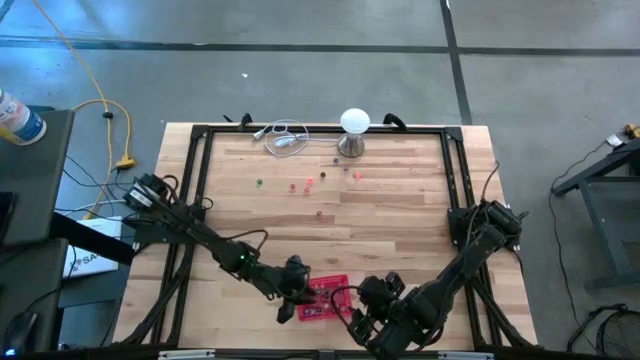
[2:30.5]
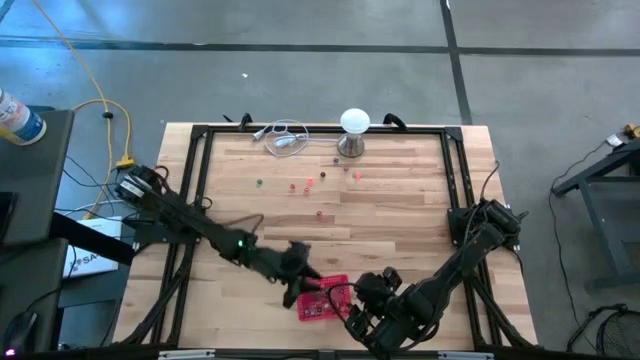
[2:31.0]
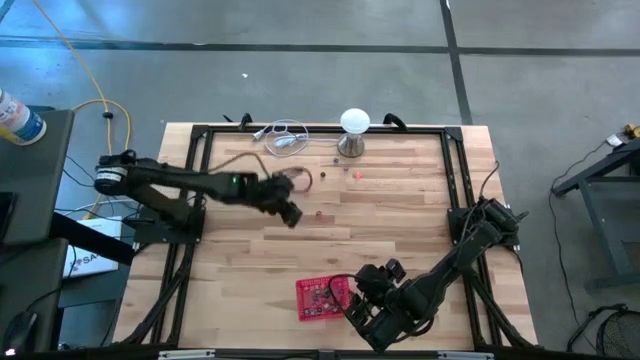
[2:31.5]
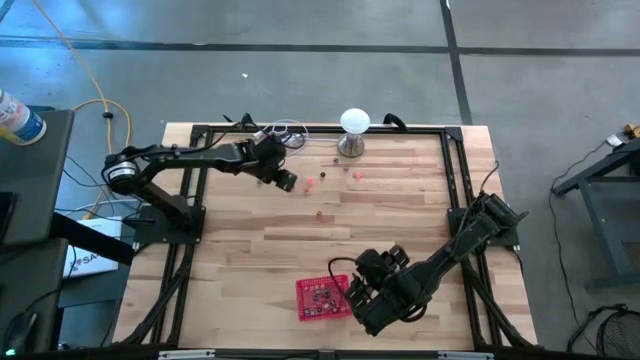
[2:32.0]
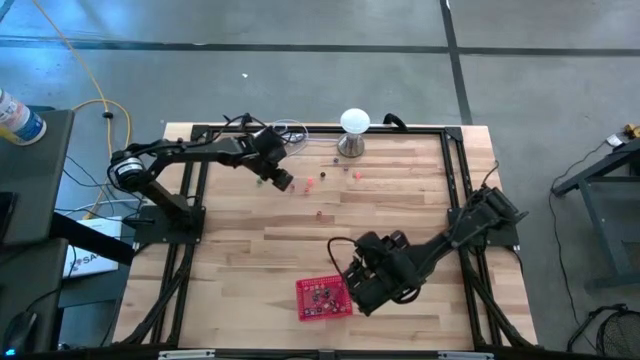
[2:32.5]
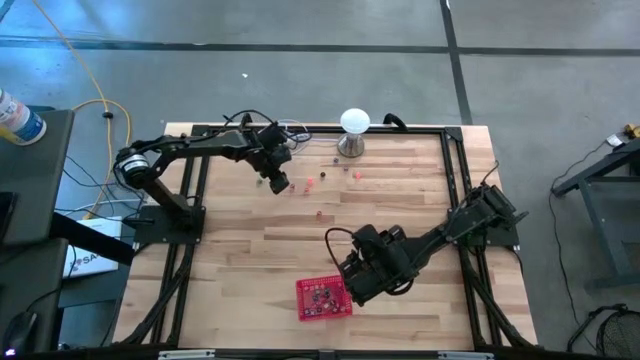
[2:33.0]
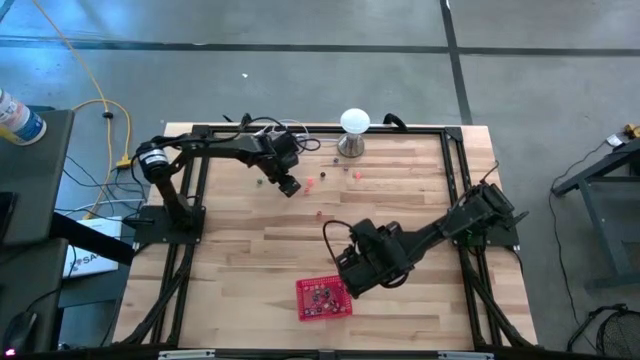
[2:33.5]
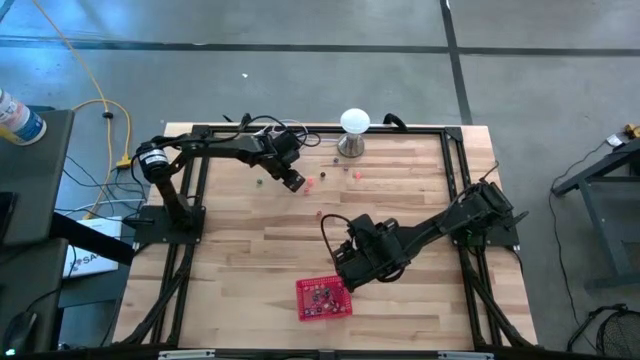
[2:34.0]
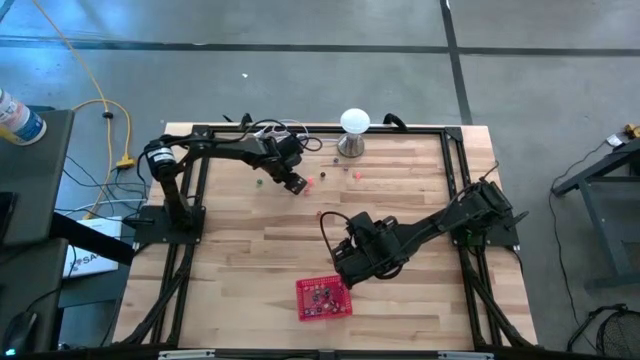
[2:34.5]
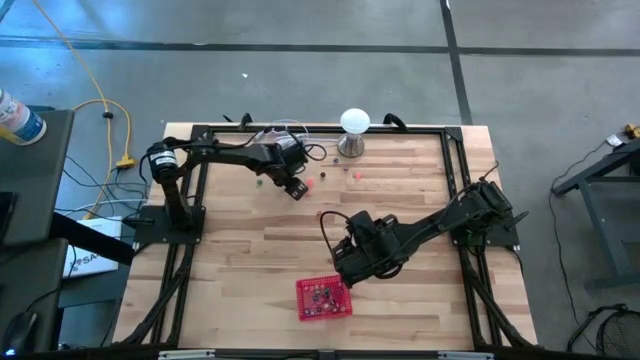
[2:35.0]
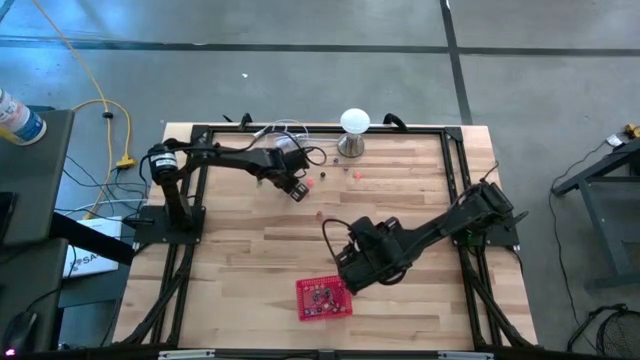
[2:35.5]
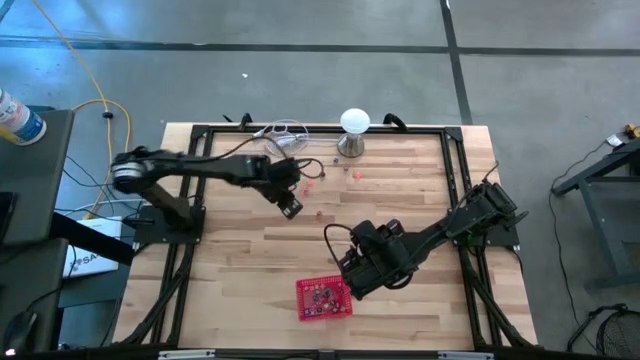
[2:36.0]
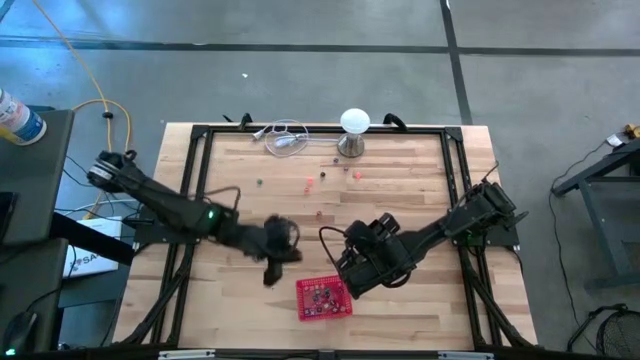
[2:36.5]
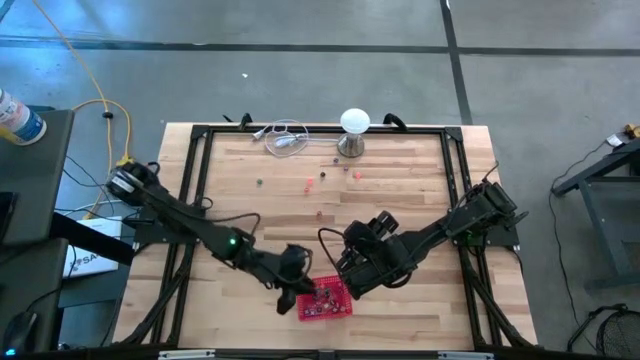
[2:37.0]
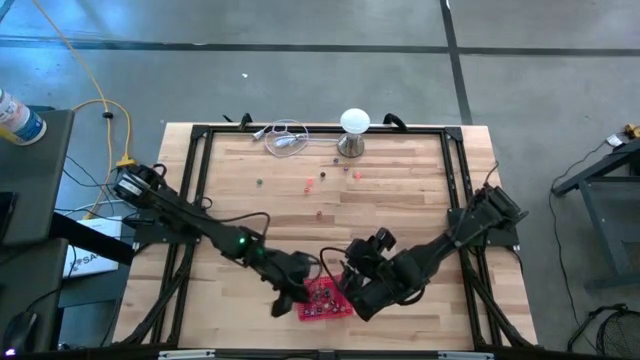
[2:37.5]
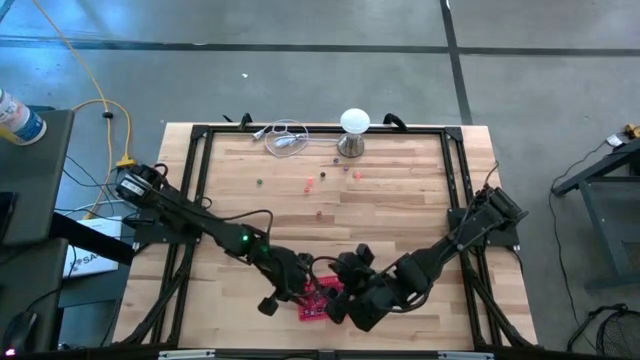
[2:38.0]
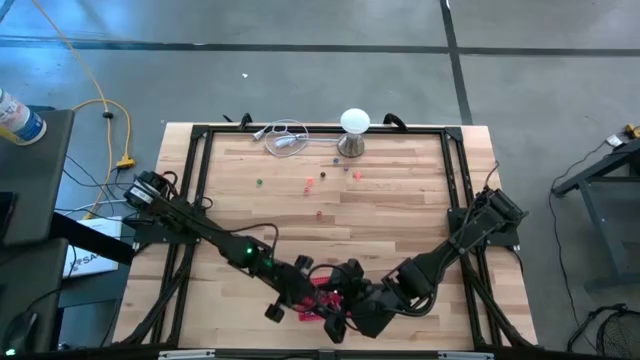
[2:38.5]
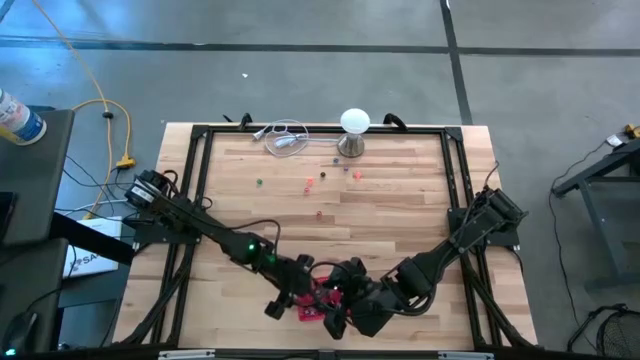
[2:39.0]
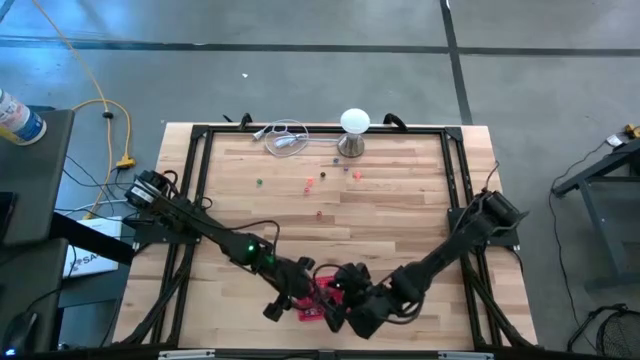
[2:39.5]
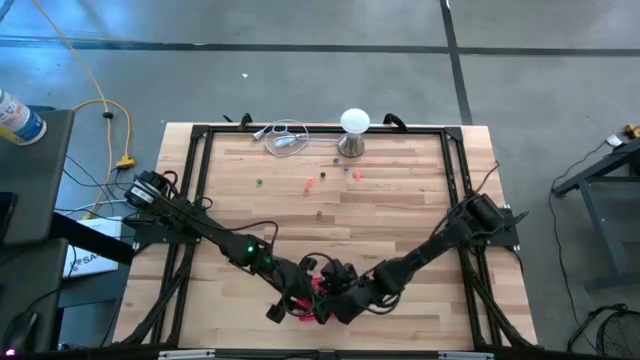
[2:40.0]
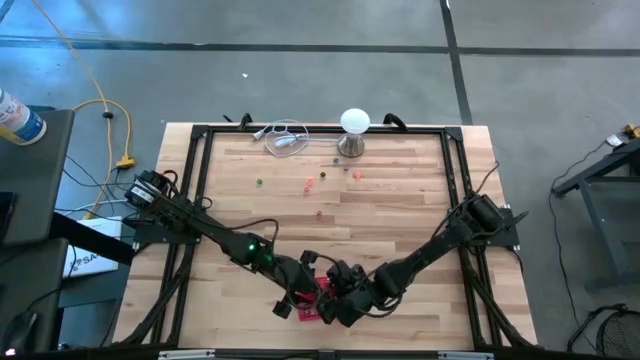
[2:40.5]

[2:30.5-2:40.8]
Task: Pick & Place Dice
Put the red dice into the red bin

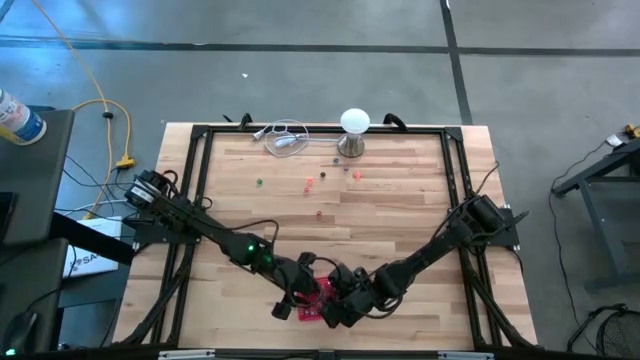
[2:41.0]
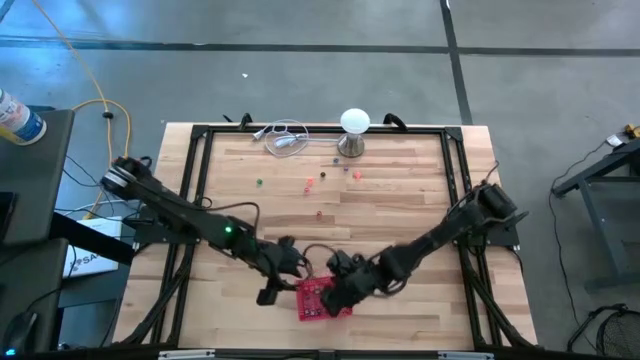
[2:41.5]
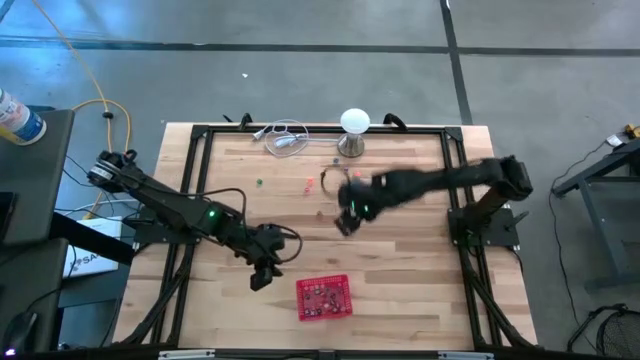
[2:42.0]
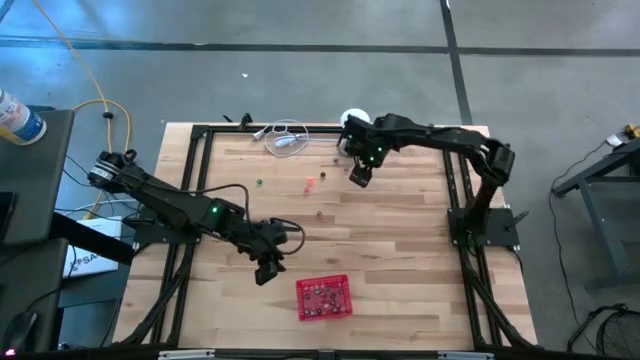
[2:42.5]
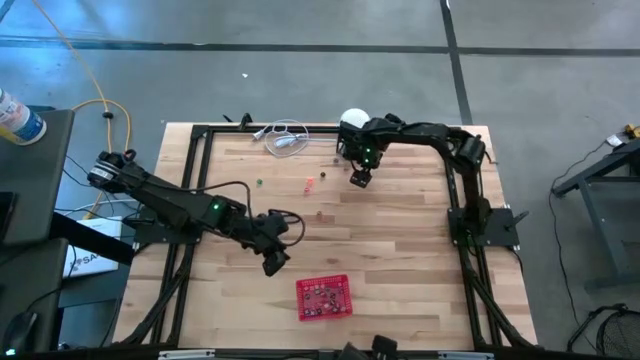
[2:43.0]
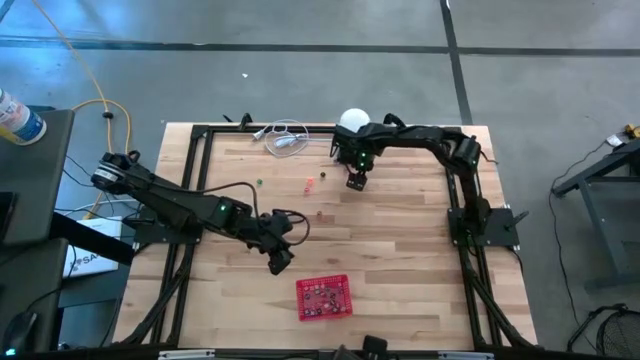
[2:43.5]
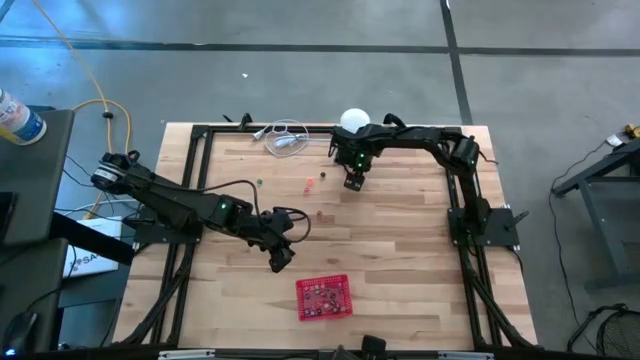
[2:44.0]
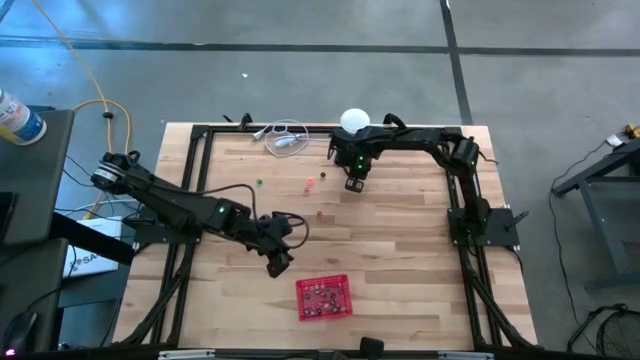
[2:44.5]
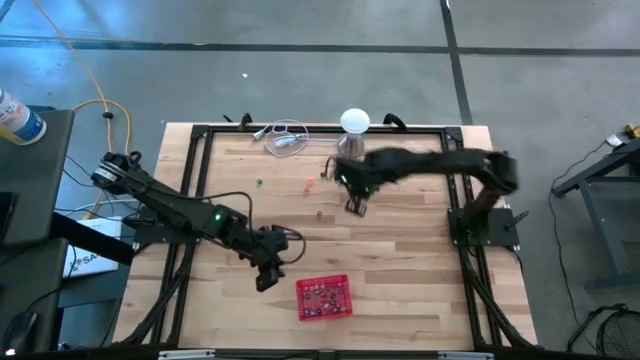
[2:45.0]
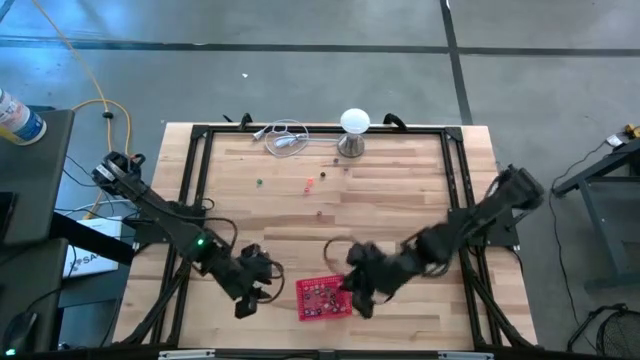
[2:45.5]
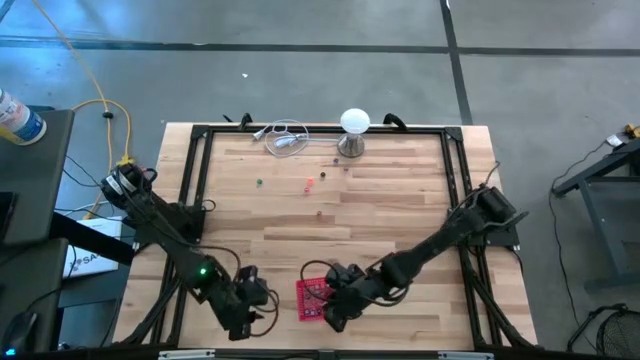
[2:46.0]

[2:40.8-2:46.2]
Put the orange dice into the red bin

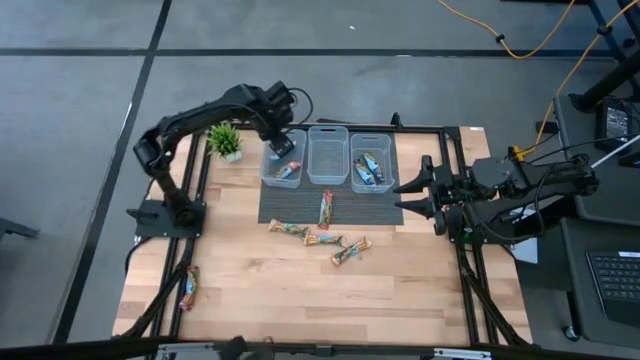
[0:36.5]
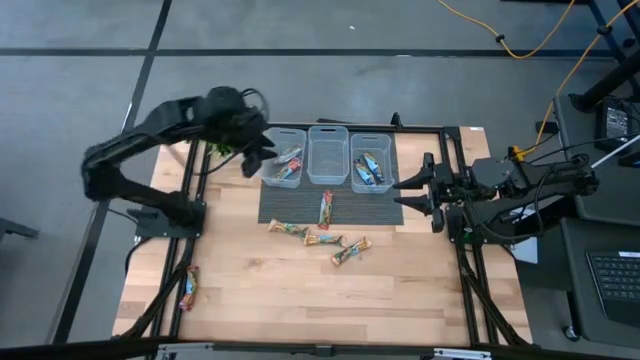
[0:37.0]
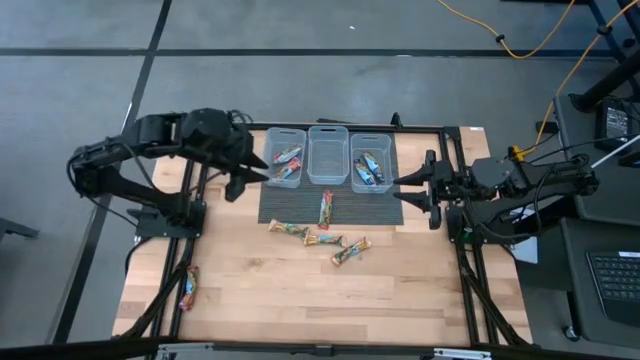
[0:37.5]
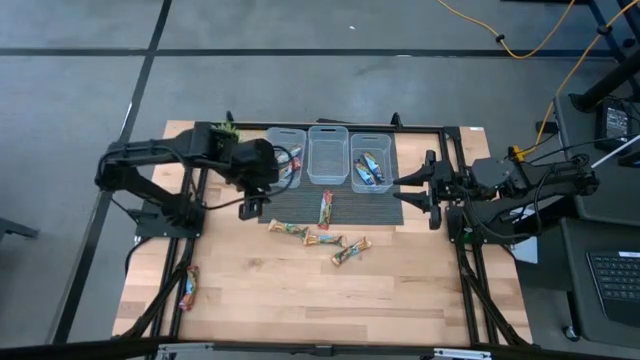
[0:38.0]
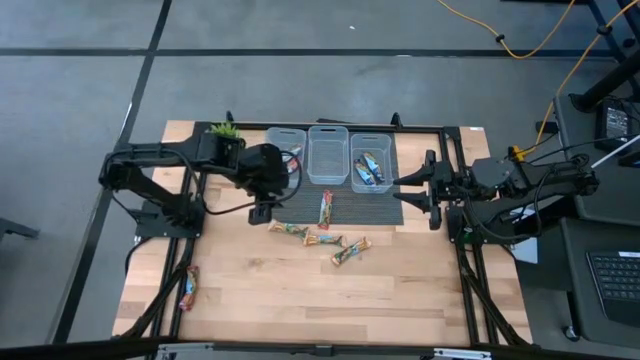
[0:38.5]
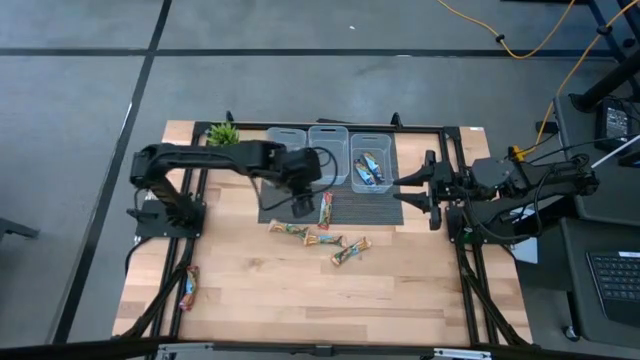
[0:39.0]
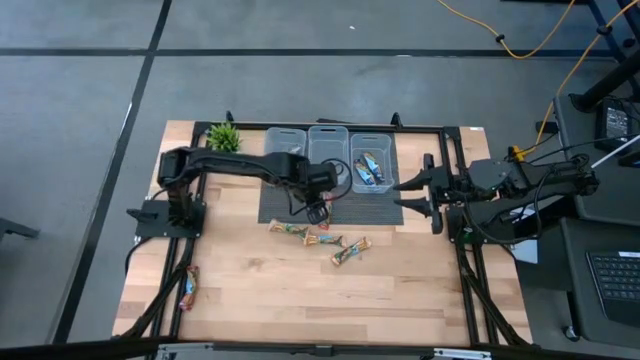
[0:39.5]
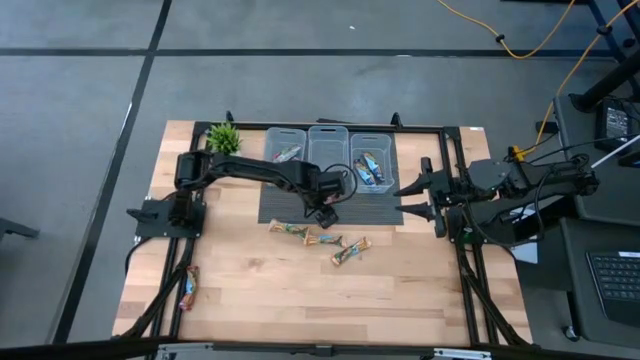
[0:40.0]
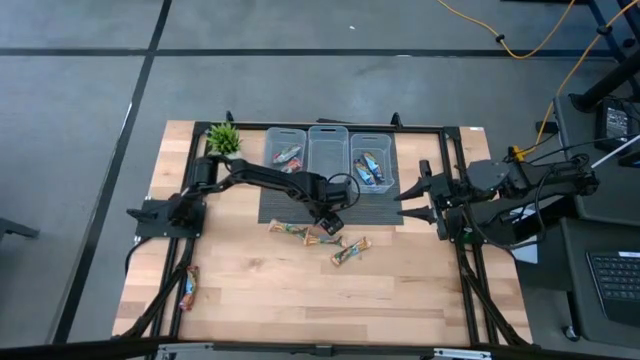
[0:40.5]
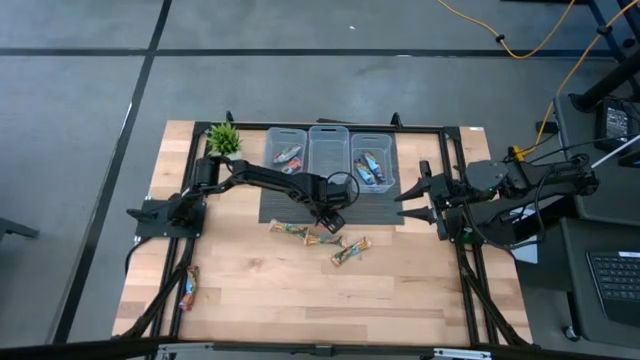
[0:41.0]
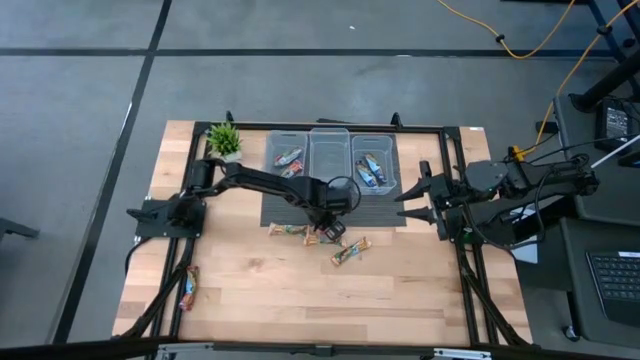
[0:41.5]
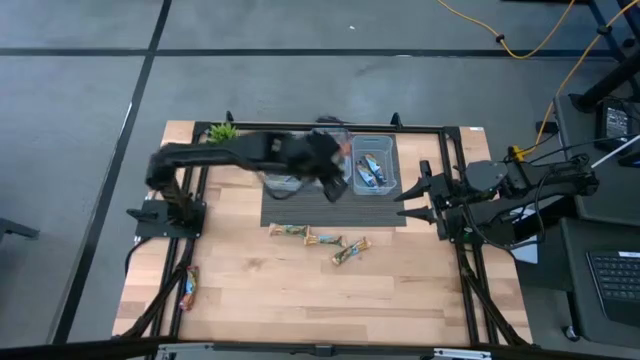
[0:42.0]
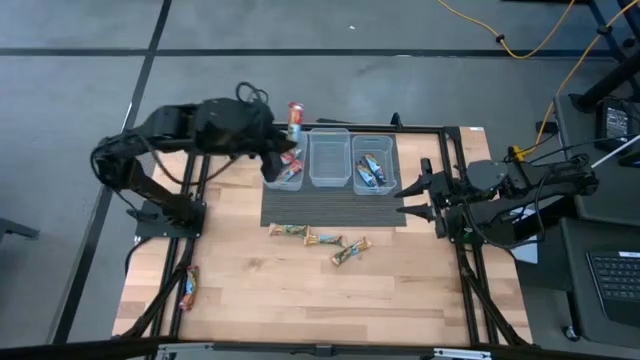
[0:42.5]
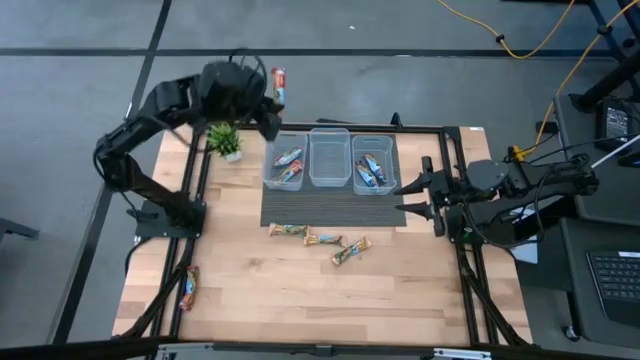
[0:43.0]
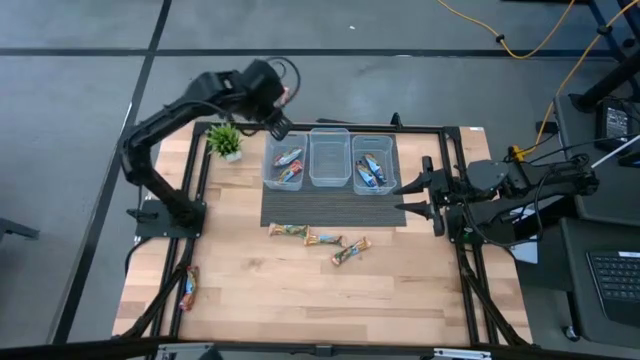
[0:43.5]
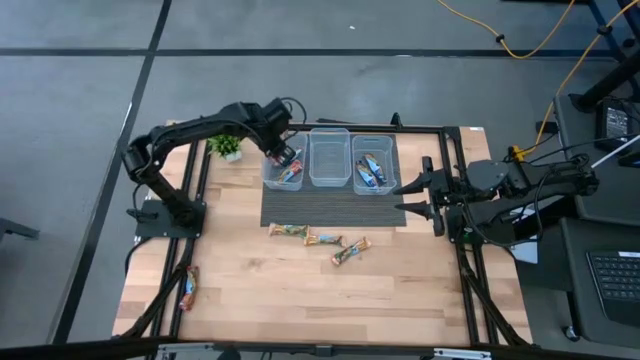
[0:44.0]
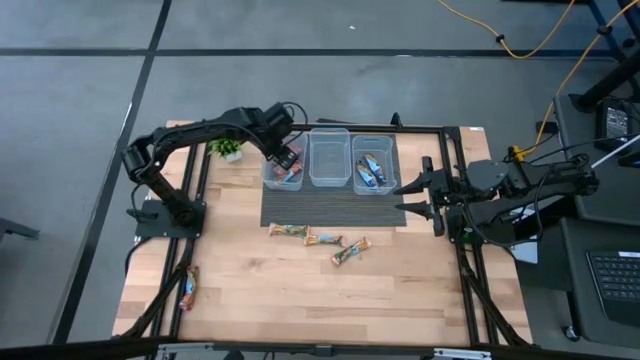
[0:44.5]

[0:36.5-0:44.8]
Task: Pick and place Granola Bars by type
Put the top red snack bar into the left transparent bin
